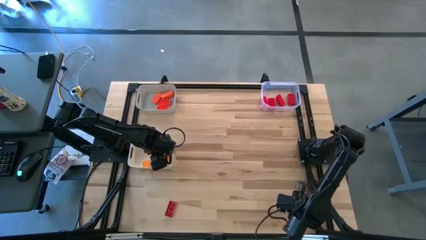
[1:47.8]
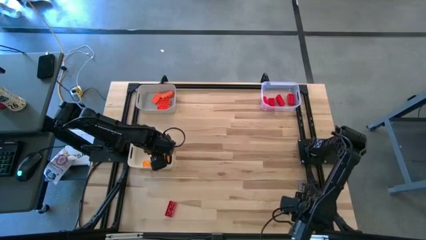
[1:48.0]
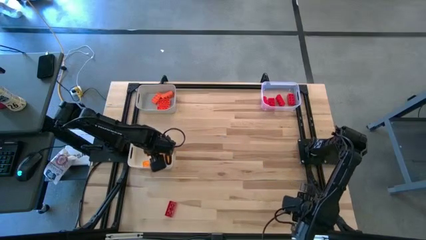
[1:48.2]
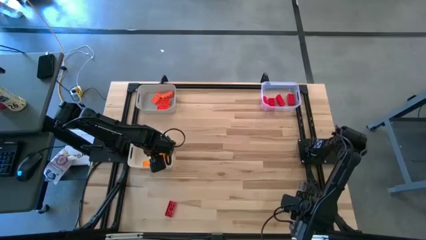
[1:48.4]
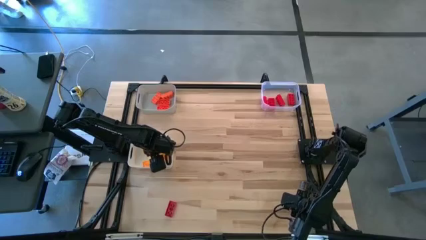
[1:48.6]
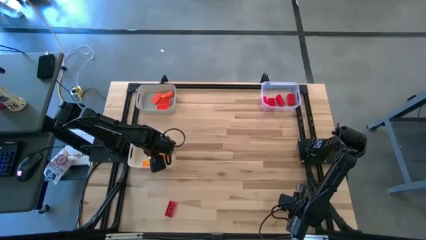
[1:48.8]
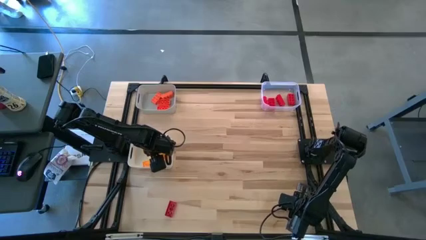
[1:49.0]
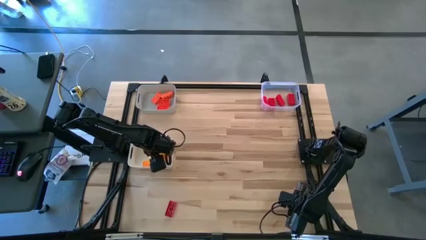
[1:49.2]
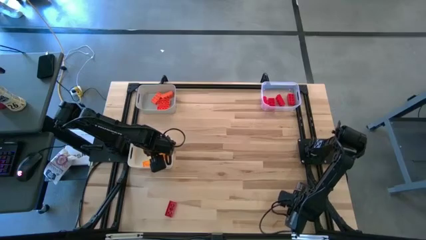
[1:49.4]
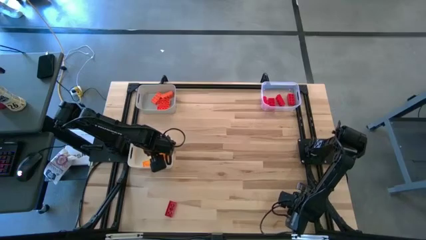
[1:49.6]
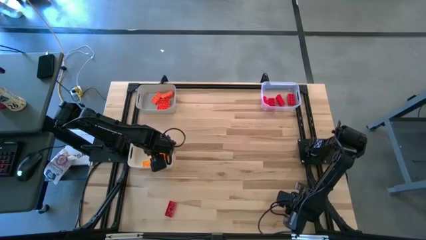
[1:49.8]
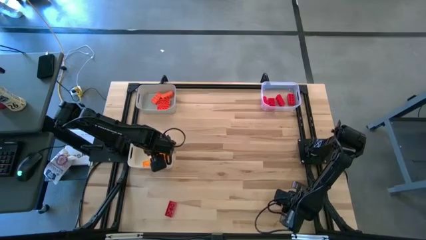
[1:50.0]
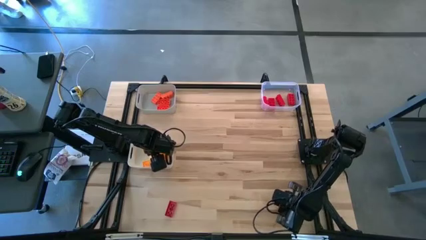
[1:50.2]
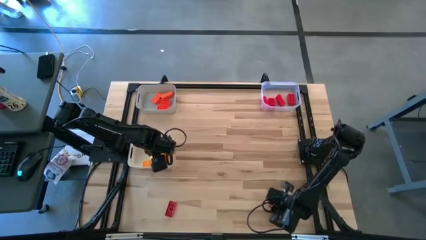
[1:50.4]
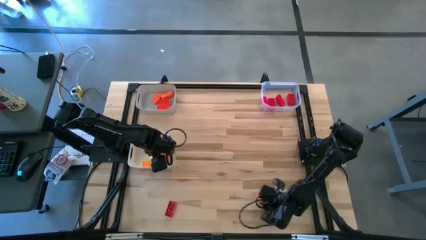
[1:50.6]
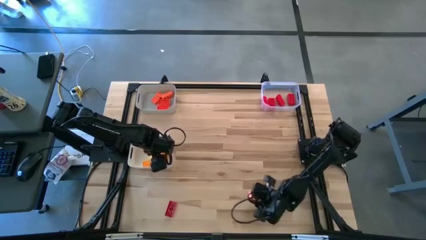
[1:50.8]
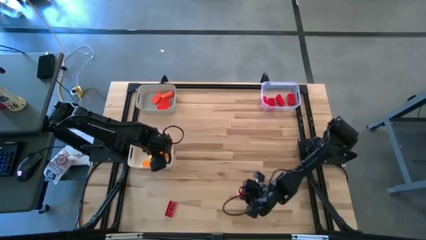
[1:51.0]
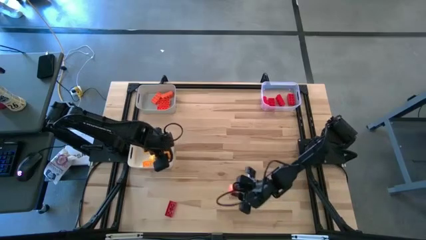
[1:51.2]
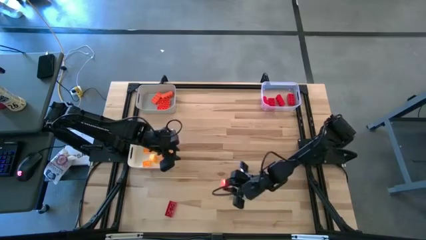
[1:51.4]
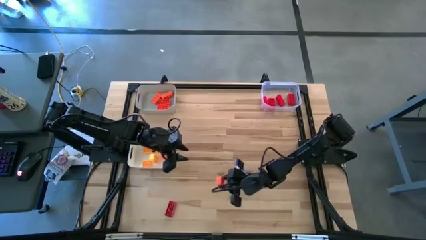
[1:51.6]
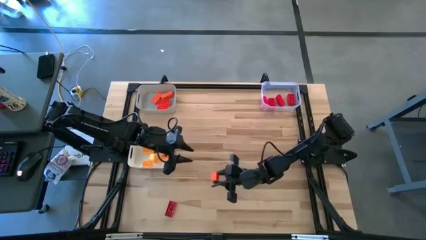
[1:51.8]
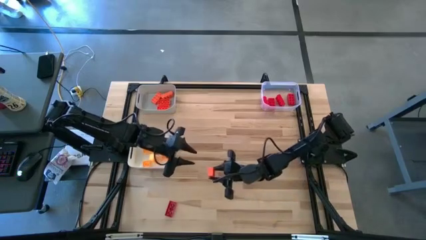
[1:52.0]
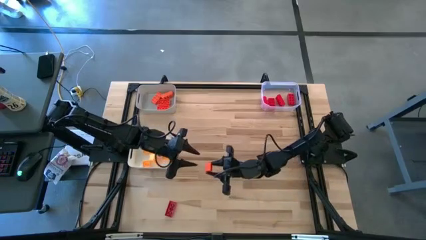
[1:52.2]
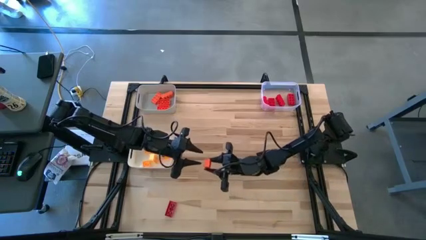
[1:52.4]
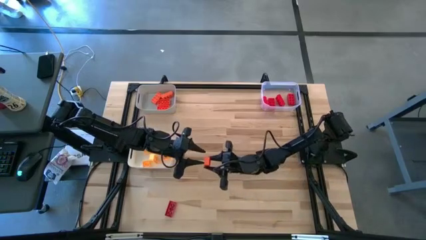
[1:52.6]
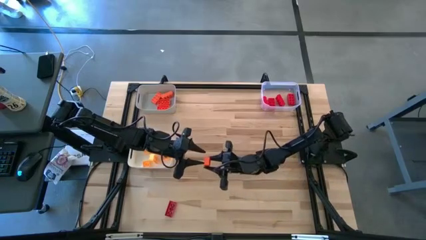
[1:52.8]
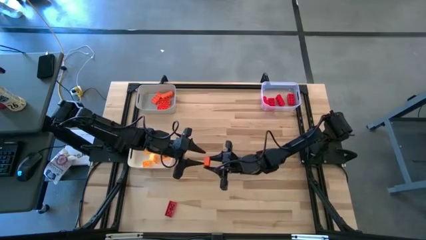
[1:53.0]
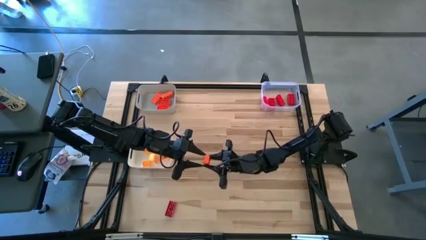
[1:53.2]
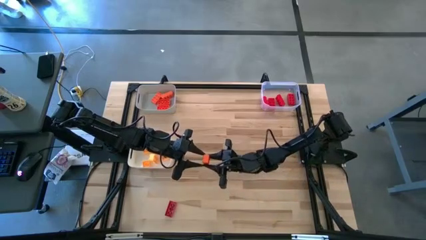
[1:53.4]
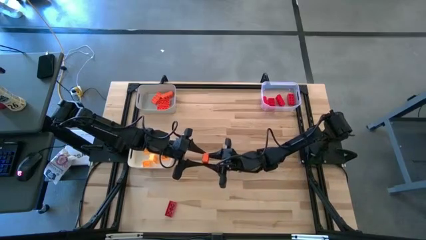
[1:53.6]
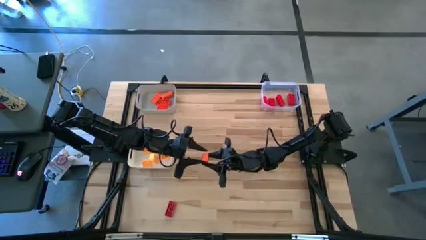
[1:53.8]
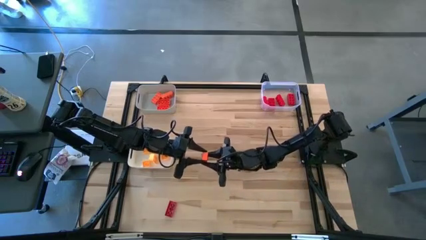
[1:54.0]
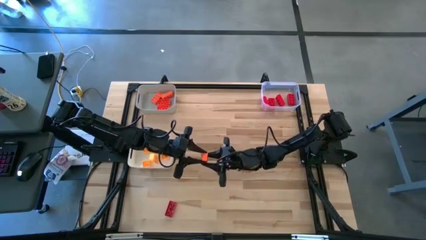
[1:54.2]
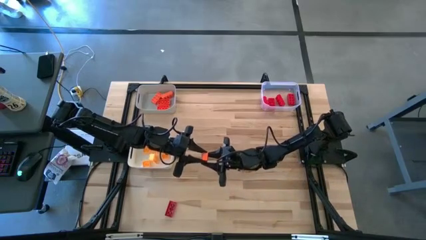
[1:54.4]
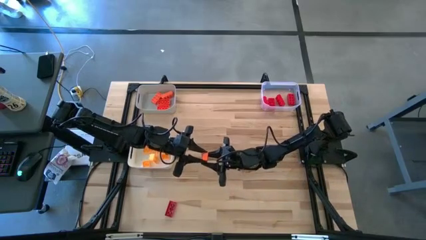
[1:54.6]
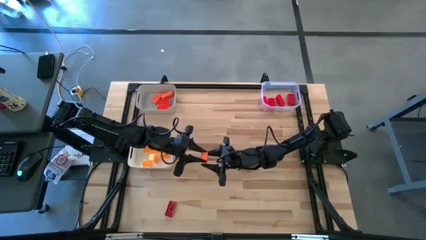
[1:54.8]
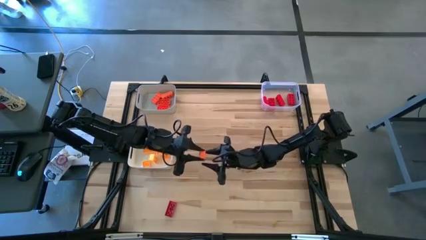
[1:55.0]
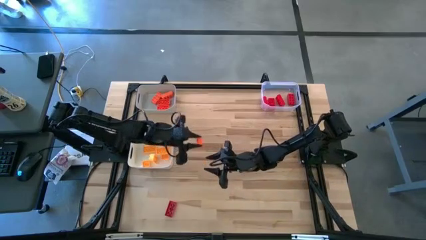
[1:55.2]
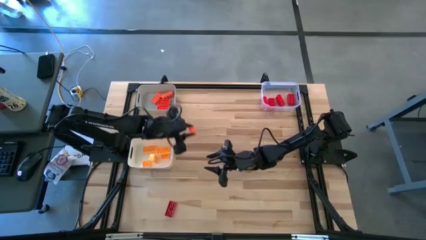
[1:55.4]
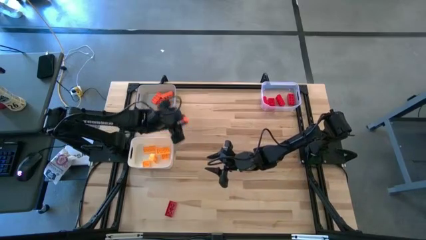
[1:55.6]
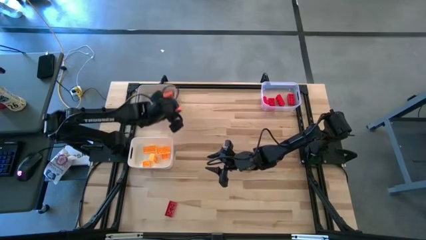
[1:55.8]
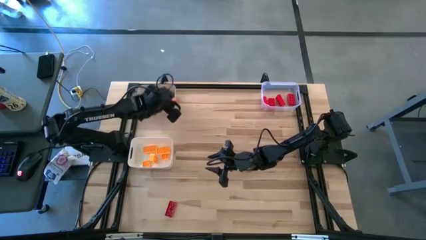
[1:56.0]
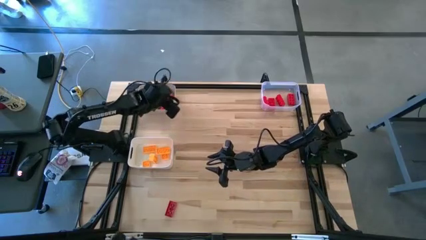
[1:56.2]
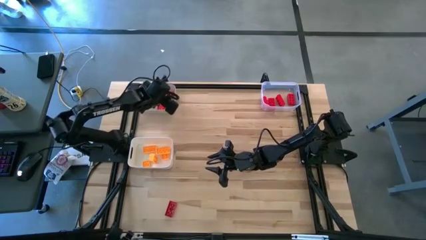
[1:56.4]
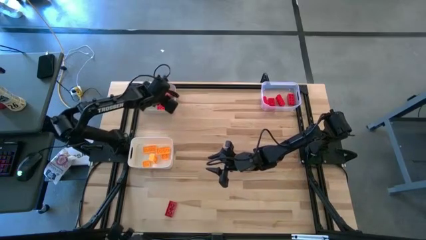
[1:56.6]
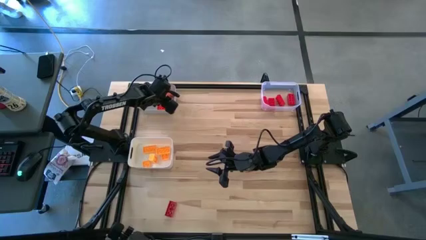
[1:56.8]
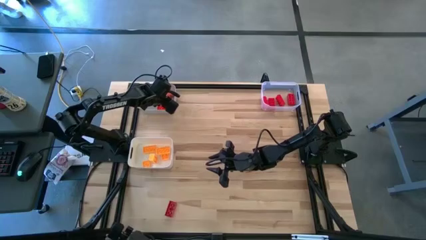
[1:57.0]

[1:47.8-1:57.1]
Task: Sort & place blocks by color
Put the orange game piece into the gray bin

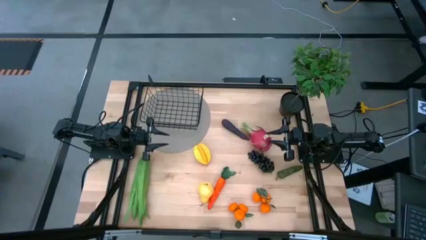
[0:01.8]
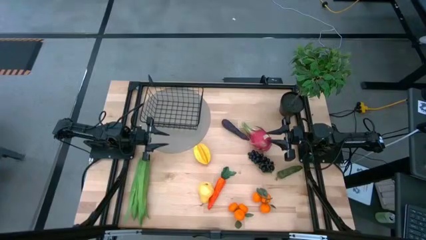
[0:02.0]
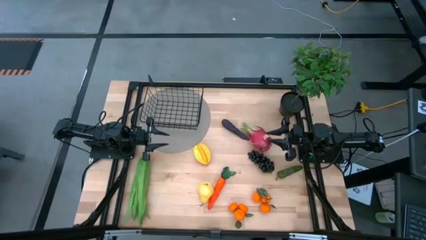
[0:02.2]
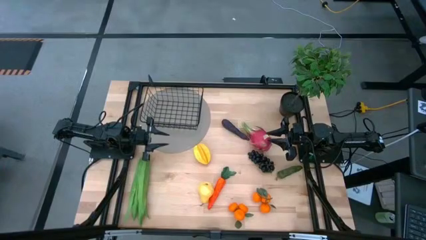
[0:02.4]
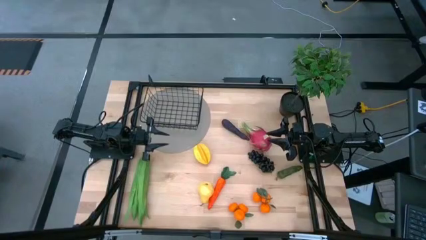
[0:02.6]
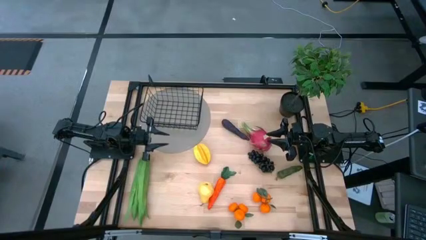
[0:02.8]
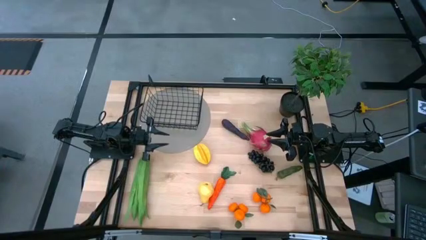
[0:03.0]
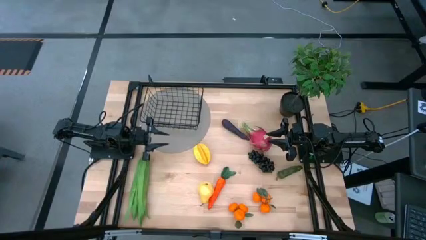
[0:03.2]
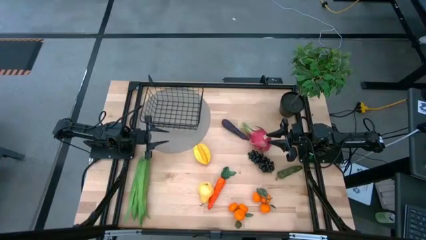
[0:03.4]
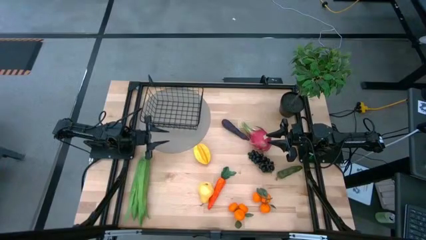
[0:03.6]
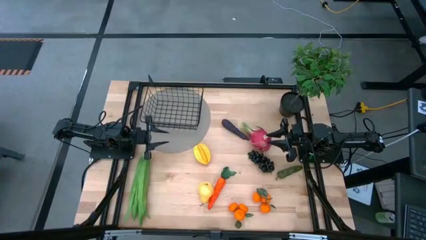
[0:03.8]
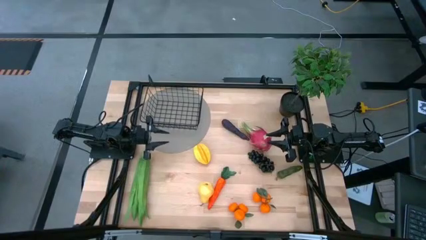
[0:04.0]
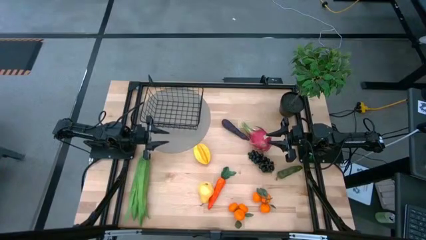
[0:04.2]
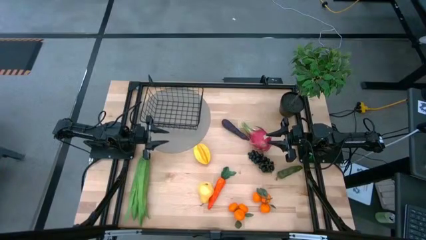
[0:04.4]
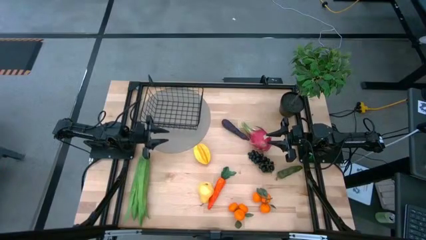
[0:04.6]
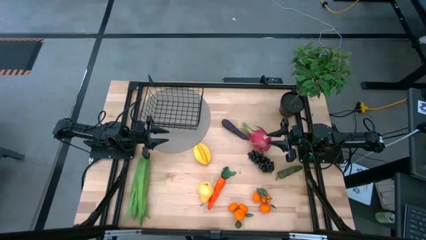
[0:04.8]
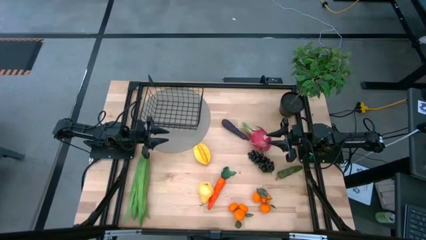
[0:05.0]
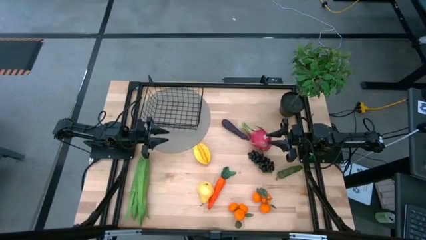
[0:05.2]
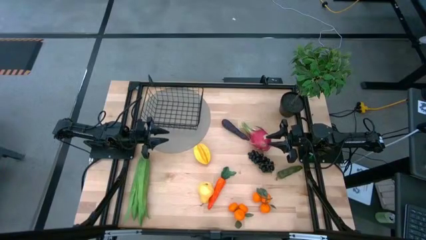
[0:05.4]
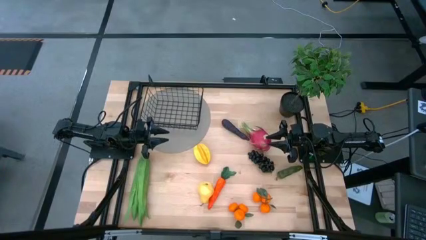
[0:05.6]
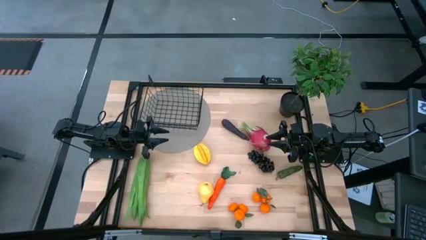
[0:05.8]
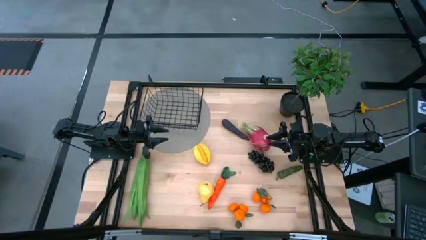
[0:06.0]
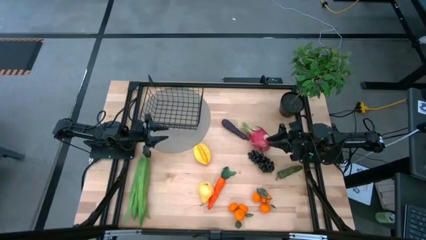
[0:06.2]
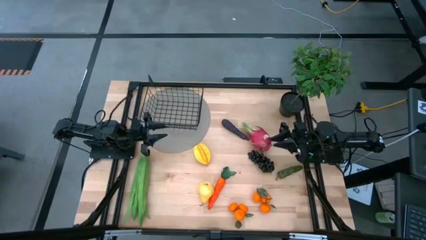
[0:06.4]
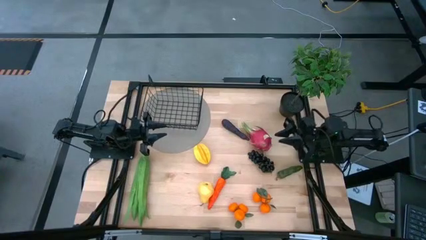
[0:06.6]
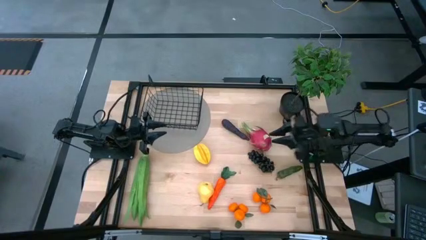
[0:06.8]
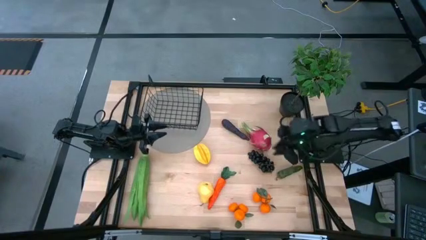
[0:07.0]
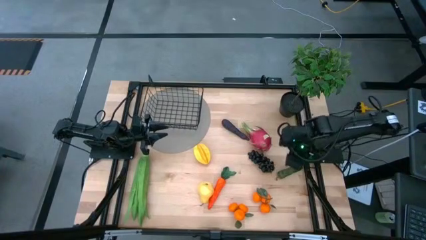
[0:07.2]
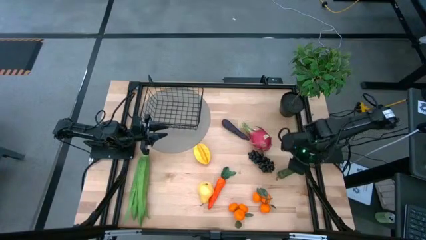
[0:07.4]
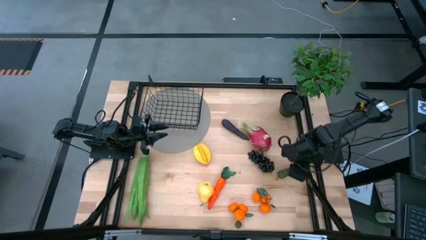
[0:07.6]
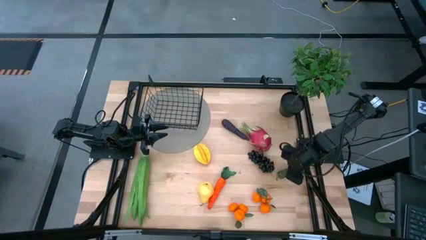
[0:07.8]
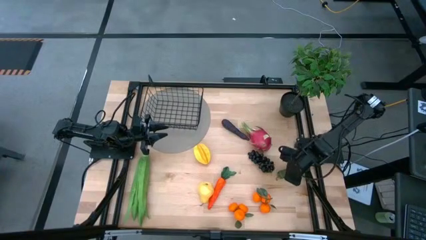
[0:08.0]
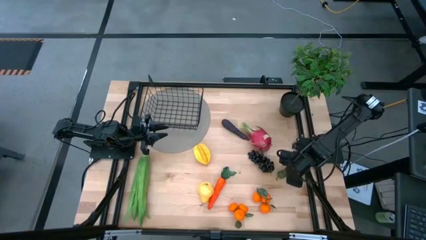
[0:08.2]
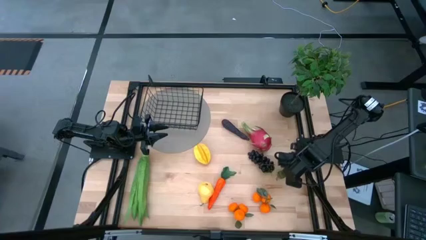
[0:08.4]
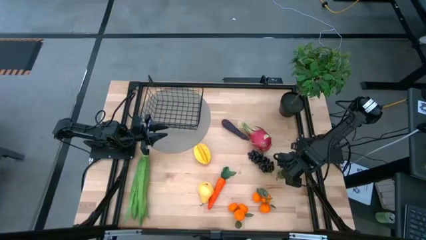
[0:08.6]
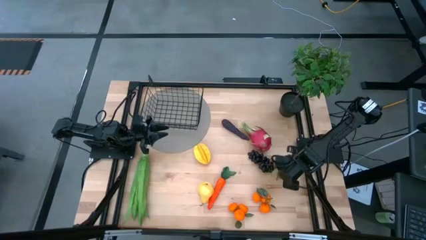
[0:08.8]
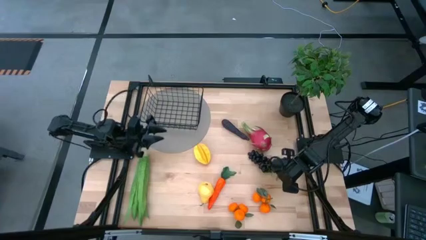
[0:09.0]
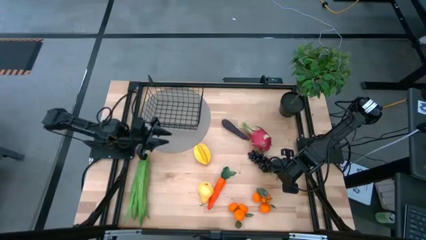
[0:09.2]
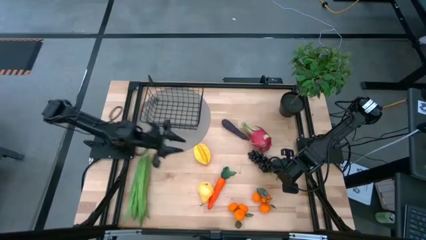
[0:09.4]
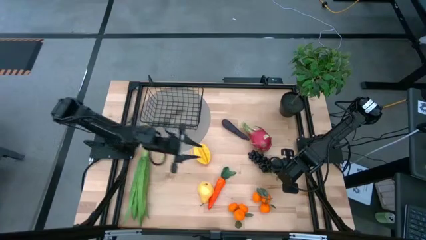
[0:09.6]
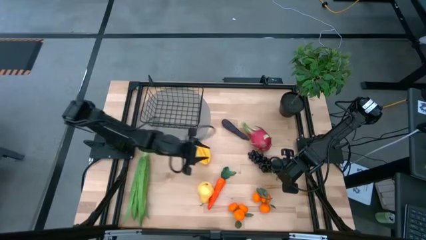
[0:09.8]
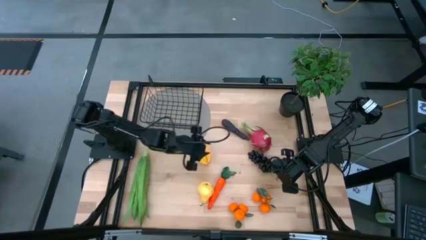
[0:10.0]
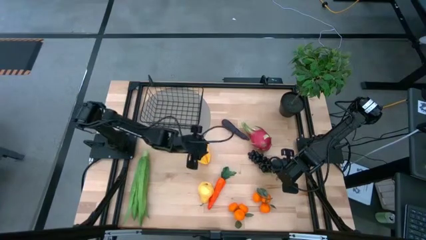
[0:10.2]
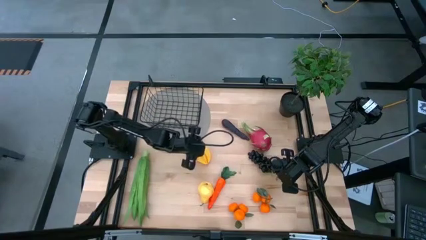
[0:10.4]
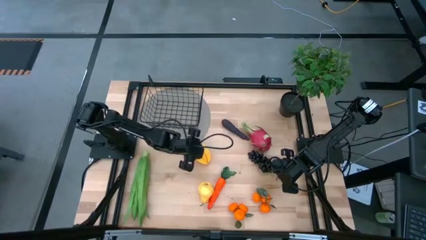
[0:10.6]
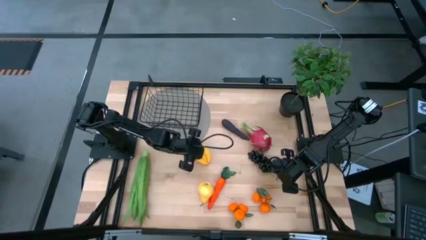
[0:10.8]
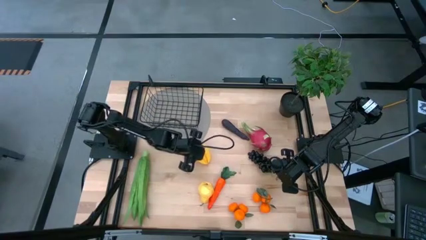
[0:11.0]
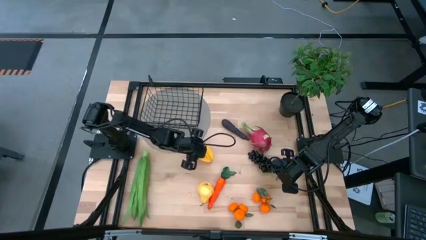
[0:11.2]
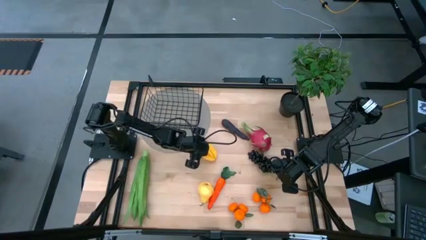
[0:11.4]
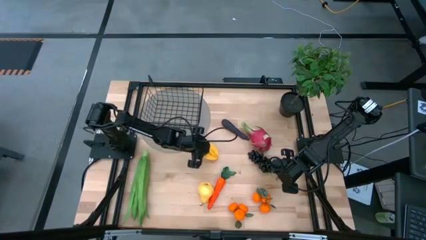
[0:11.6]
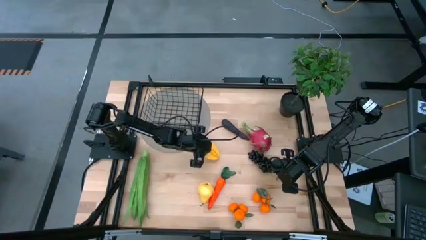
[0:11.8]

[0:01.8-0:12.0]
Task: Build produce basket
Put the yellow starfruit into the black wire basket
